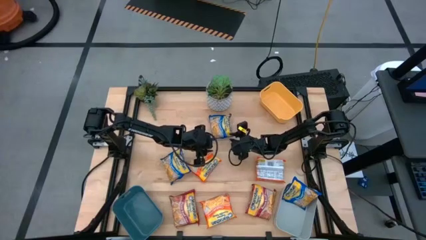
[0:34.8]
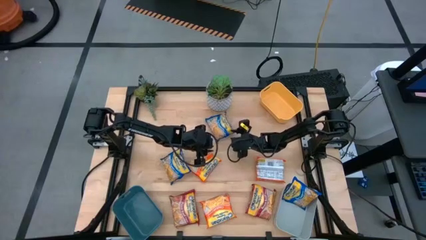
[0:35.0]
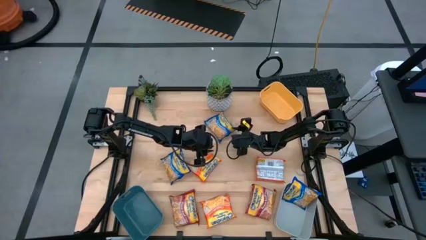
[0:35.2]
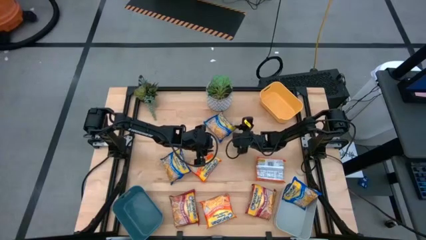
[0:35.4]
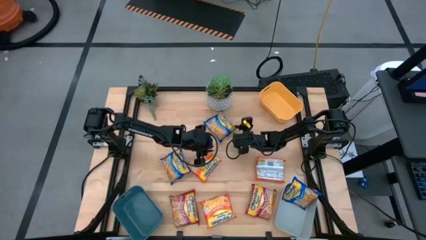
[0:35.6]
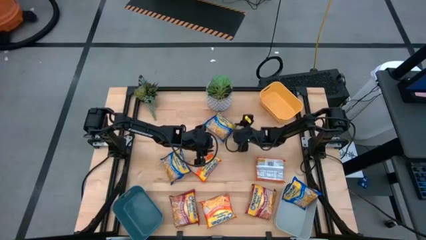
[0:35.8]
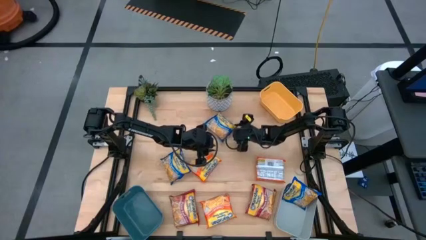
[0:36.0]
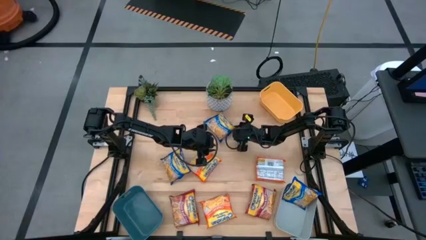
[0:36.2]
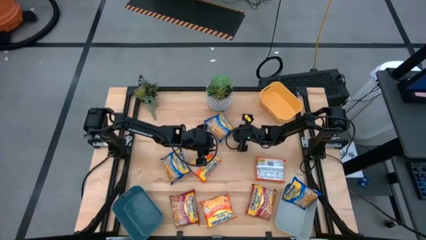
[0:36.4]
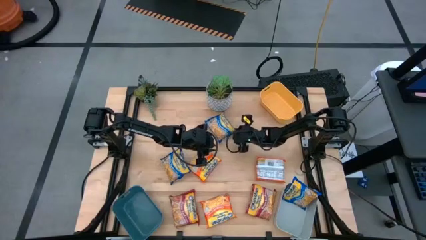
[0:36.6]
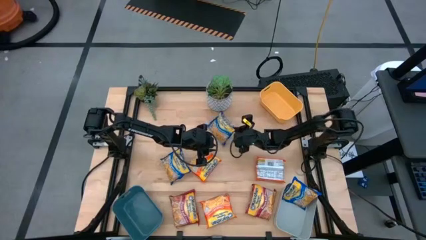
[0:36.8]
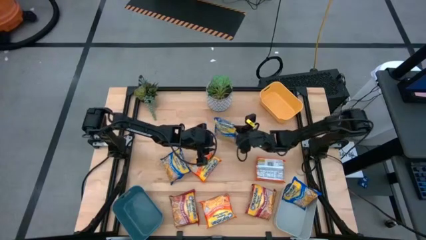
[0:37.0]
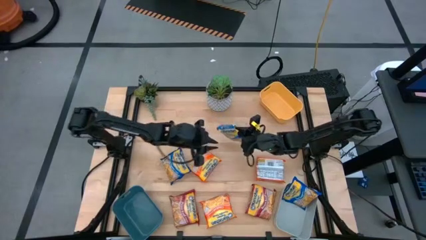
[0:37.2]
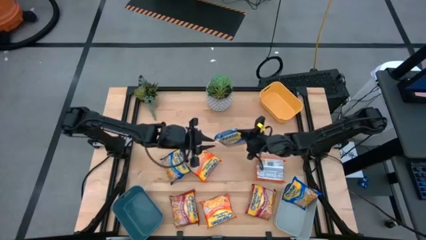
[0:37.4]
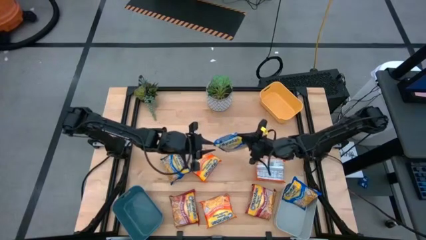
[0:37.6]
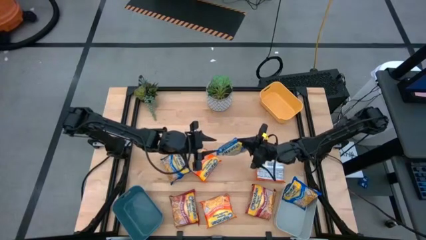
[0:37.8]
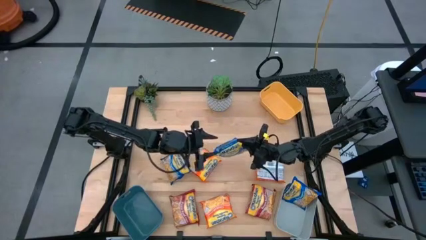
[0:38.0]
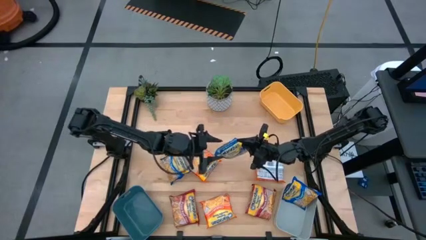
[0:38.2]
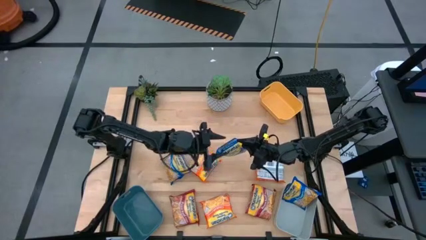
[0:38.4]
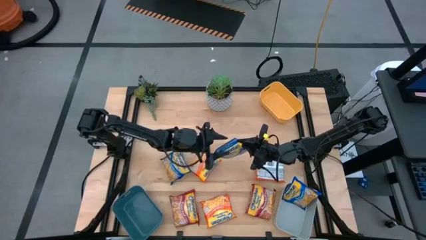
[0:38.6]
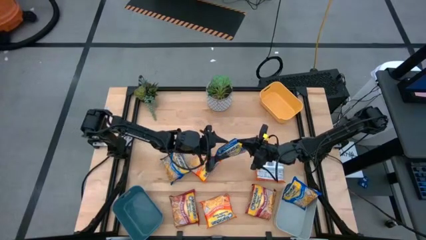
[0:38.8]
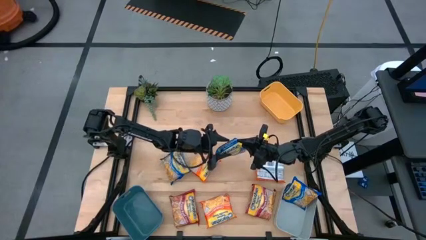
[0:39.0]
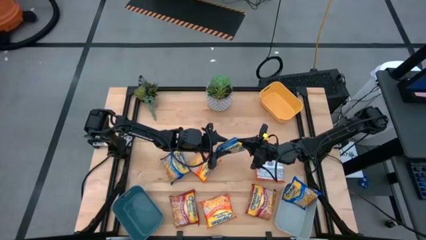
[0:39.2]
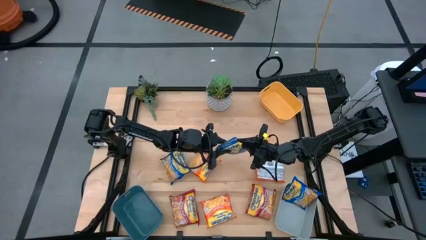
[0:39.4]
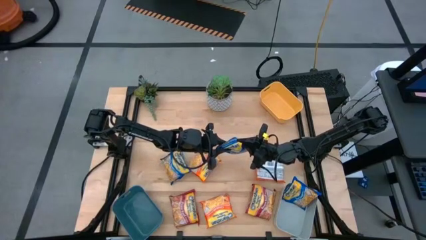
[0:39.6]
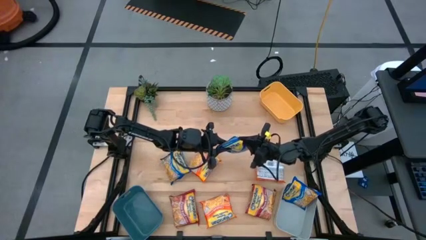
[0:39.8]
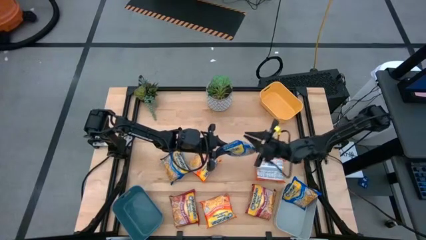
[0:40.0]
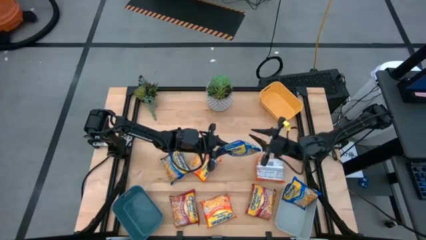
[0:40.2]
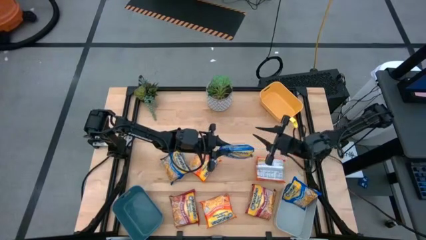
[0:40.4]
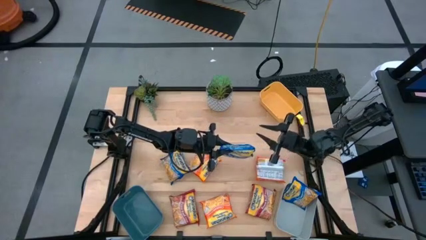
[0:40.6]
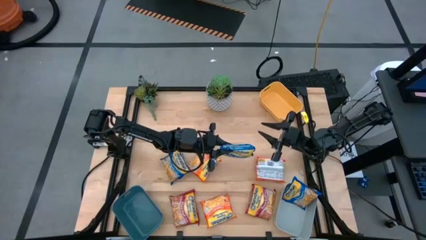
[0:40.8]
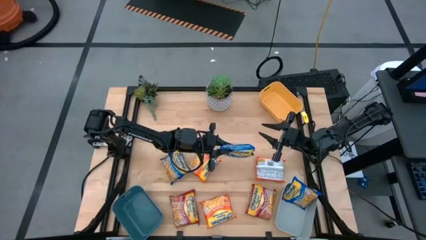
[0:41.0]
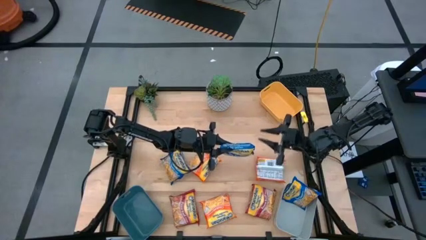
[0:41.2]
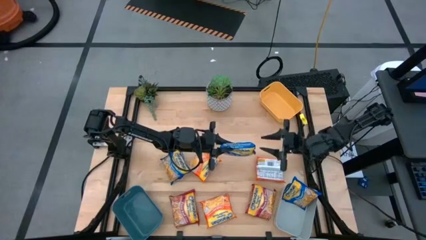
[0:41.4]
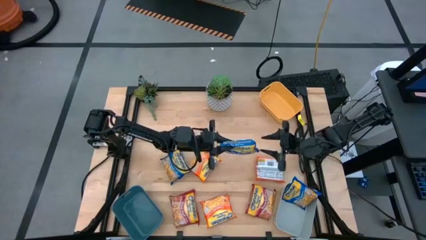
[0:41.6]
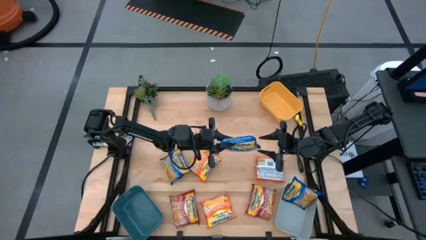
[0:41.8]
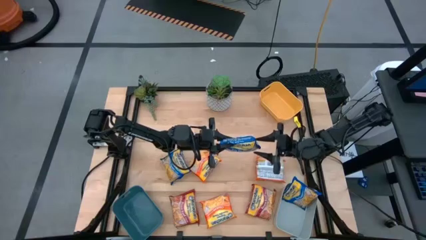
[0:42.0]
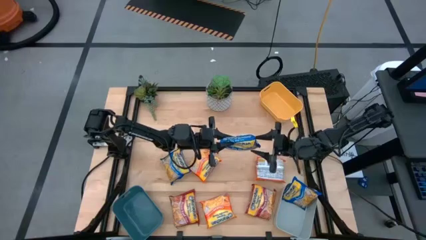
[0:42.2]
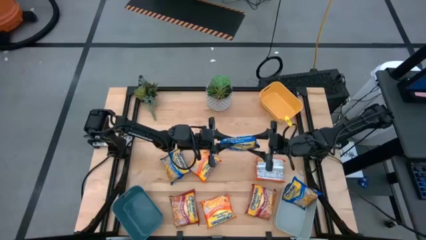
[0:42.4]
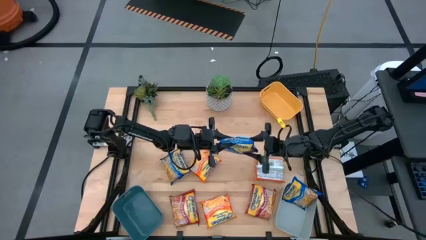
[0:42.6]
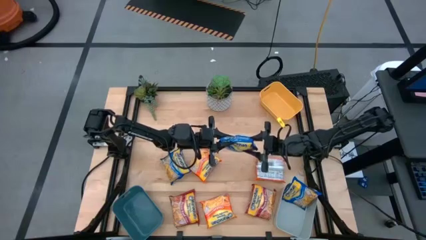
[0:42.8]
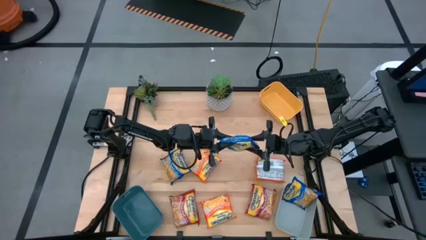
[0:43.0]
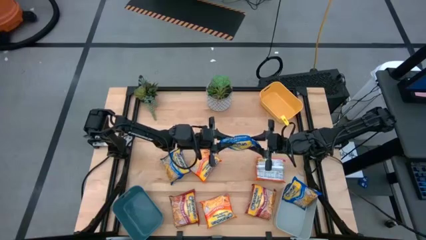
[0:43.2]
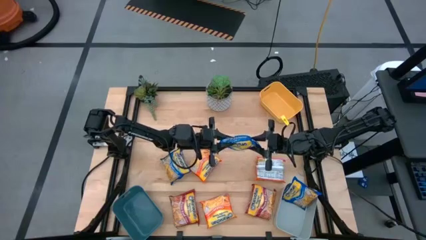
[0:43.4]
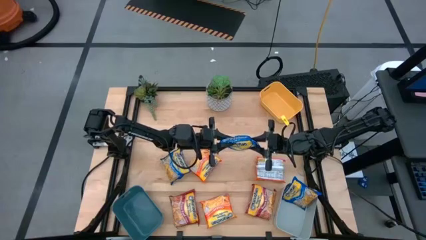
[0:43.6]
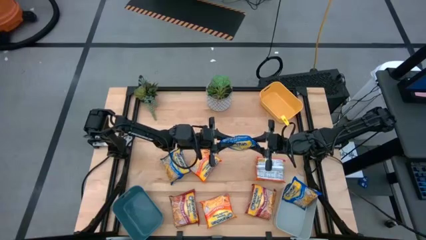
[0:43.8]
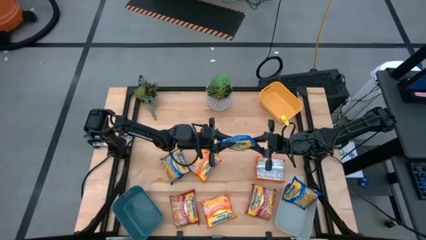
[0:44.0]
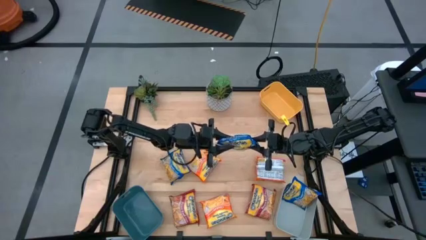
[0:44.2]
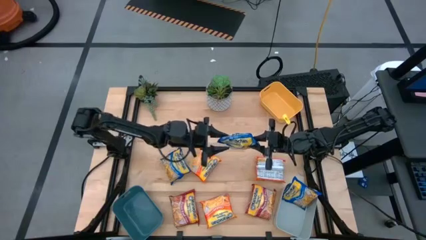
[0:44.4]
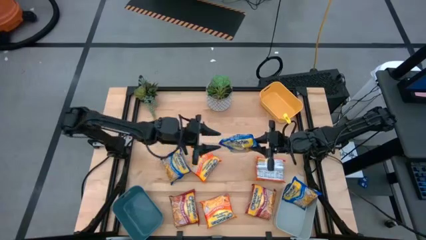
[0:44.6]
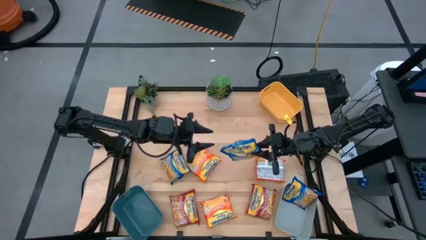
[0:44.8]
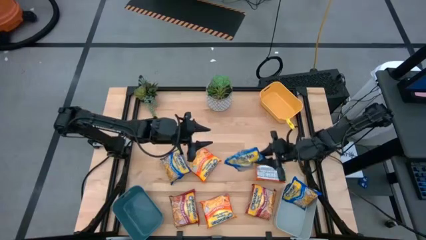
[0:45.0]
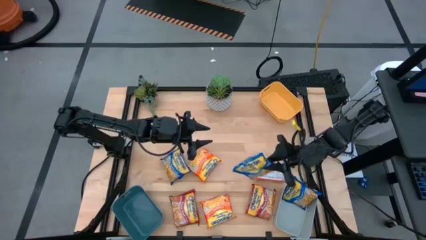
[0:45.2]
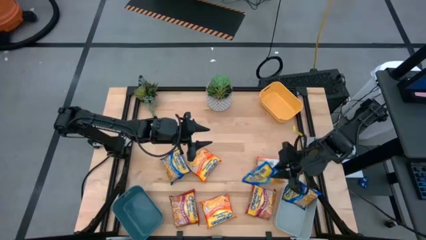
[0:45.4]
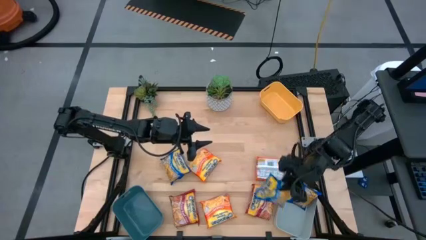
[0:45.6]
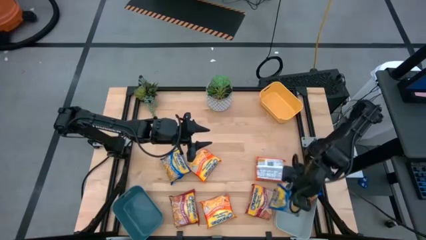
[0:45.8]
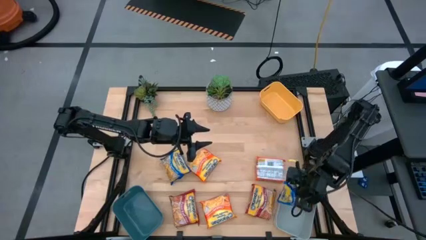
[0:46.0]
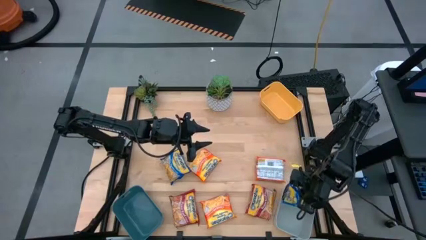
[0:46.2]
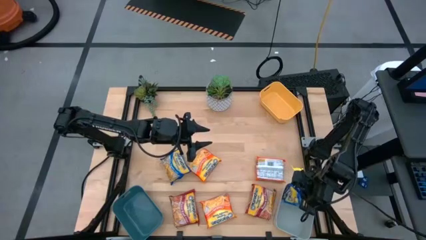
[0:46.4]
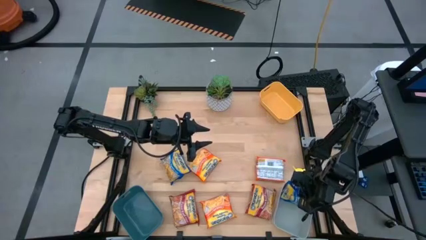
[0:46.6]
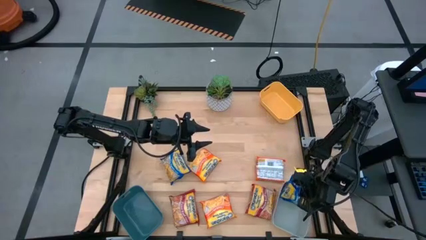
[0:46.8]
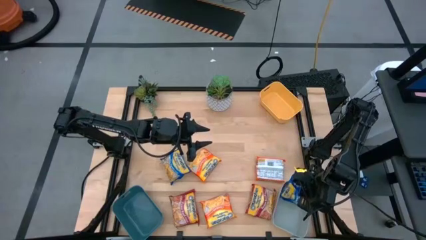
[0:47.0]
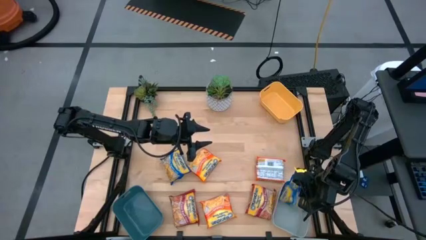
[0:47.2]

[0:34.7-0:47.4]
Task: Sort Maruchan noodles
Put the right blue noodle pack into the gray bin
